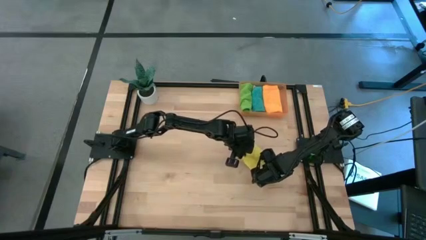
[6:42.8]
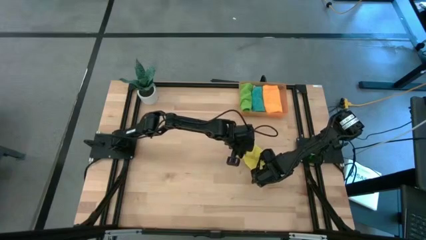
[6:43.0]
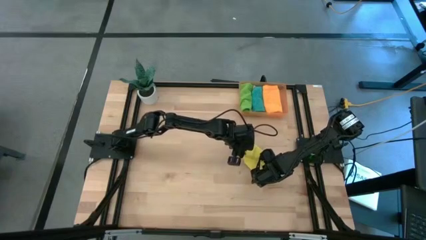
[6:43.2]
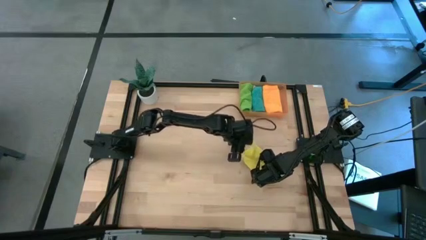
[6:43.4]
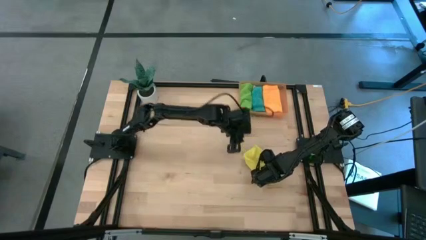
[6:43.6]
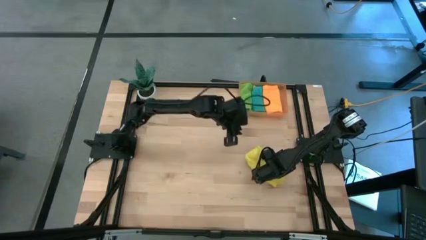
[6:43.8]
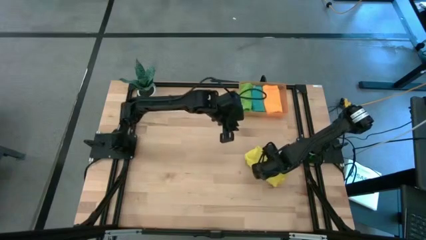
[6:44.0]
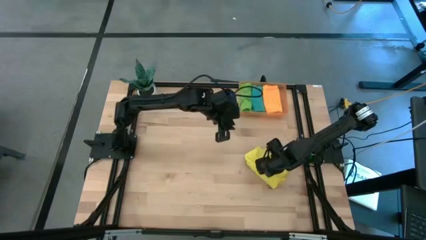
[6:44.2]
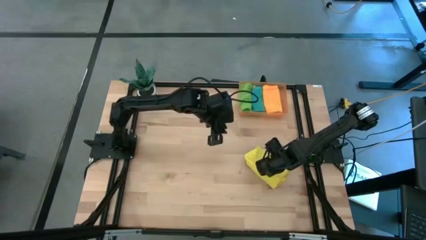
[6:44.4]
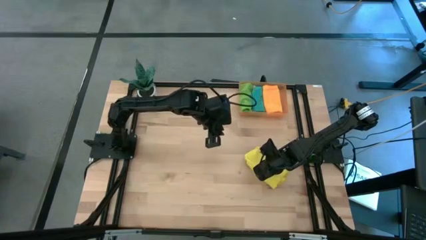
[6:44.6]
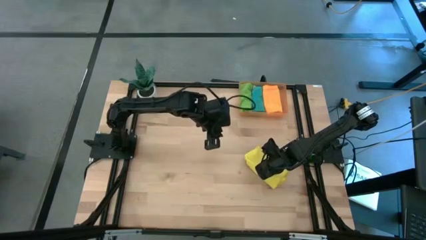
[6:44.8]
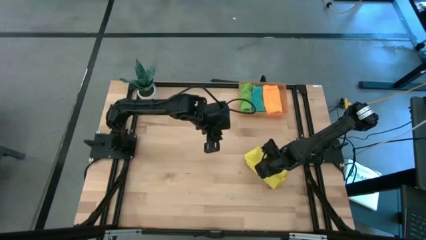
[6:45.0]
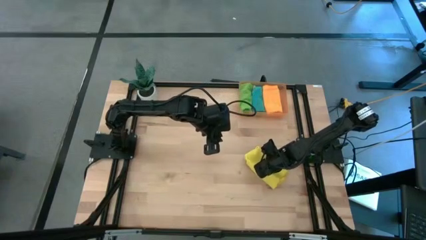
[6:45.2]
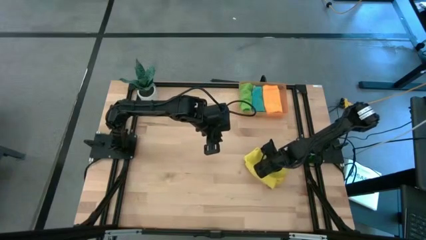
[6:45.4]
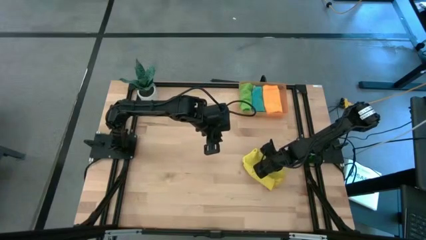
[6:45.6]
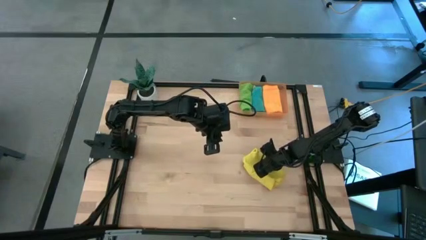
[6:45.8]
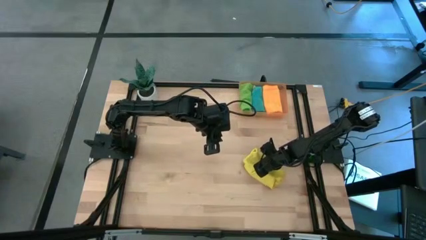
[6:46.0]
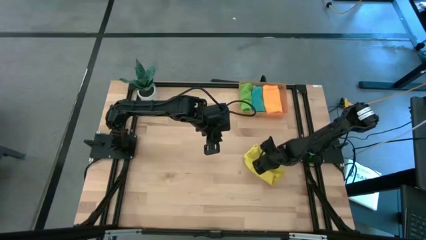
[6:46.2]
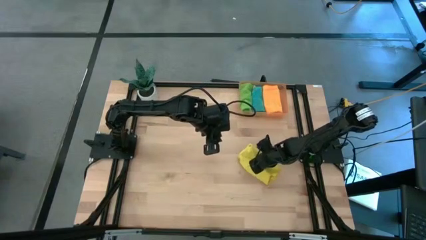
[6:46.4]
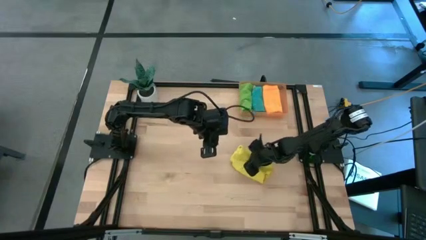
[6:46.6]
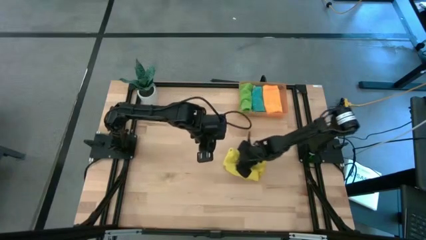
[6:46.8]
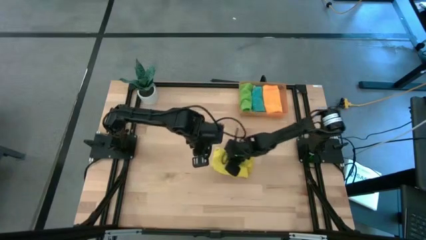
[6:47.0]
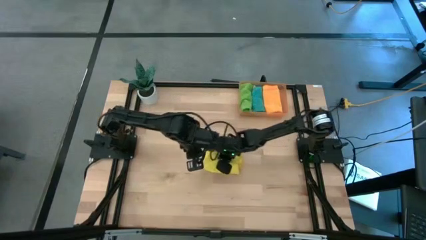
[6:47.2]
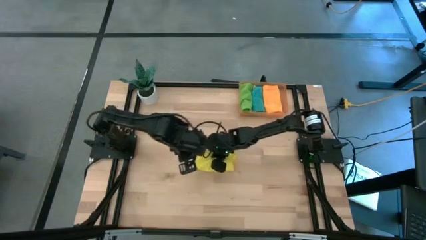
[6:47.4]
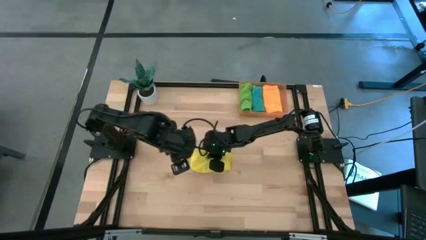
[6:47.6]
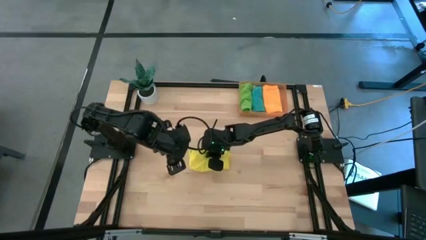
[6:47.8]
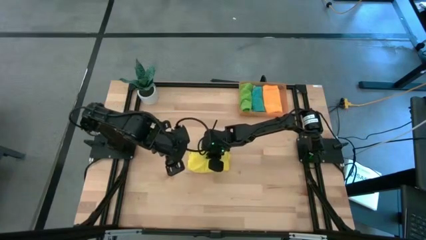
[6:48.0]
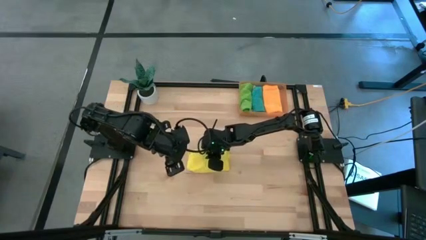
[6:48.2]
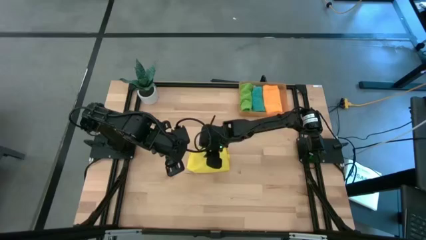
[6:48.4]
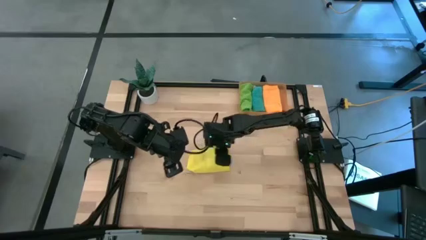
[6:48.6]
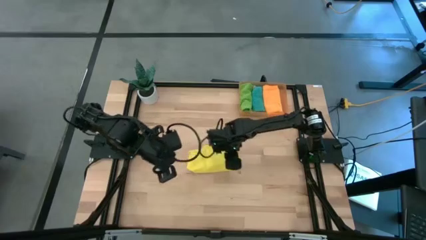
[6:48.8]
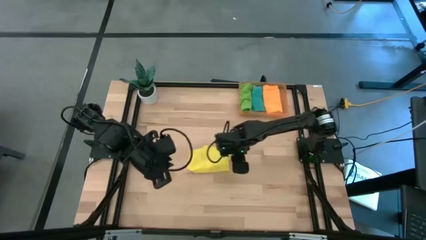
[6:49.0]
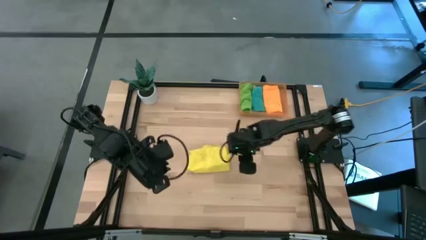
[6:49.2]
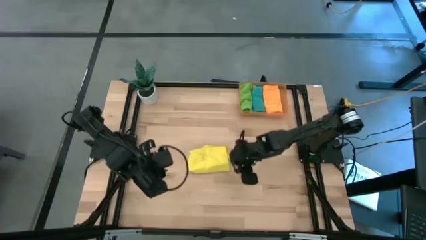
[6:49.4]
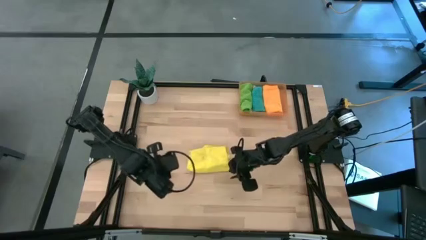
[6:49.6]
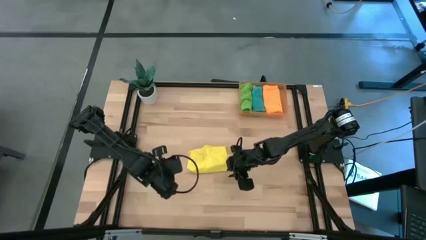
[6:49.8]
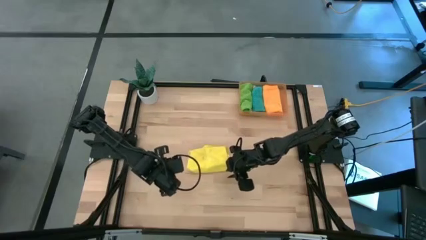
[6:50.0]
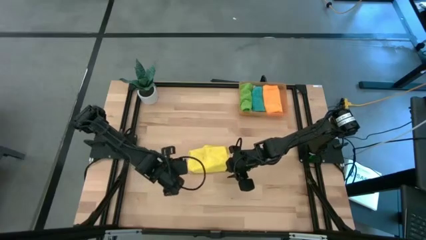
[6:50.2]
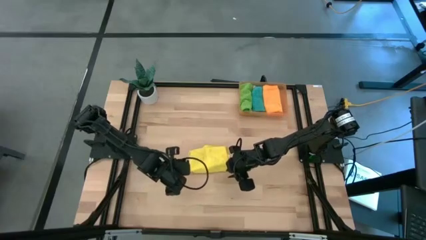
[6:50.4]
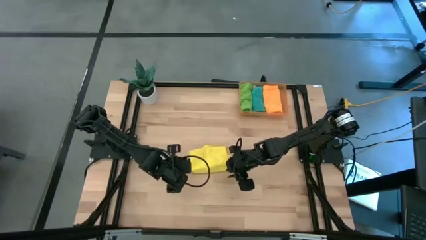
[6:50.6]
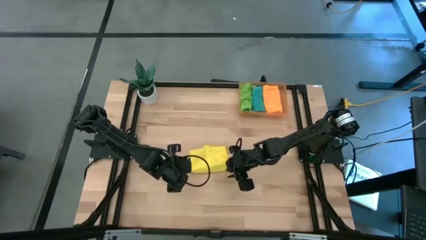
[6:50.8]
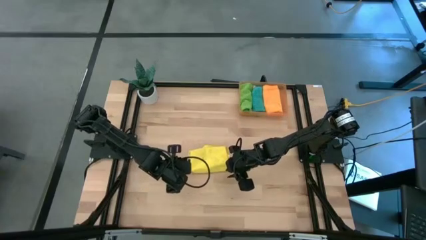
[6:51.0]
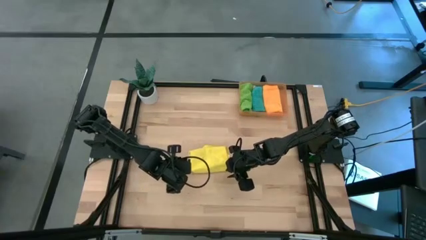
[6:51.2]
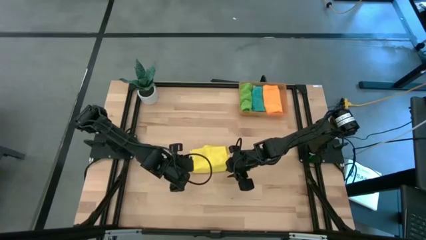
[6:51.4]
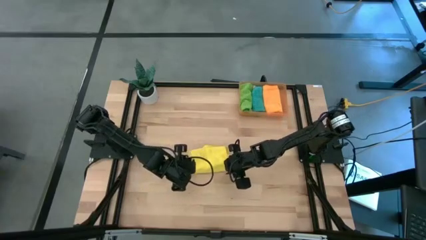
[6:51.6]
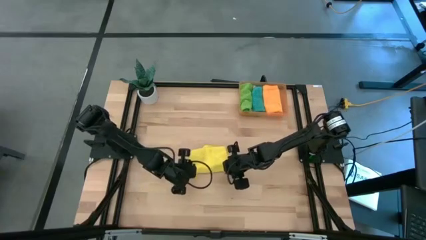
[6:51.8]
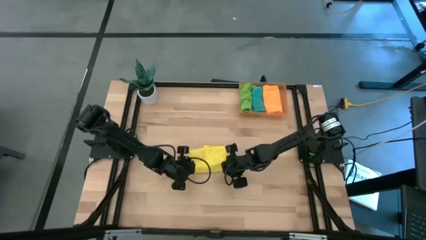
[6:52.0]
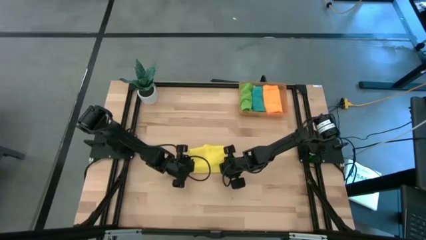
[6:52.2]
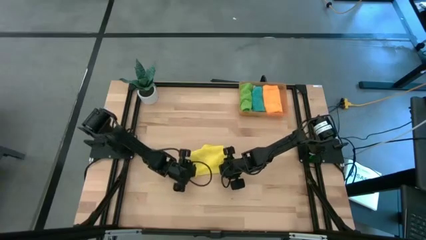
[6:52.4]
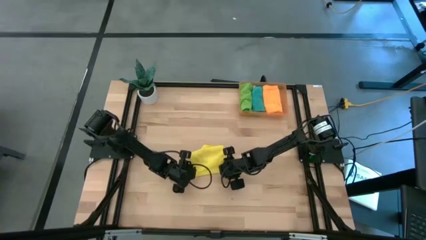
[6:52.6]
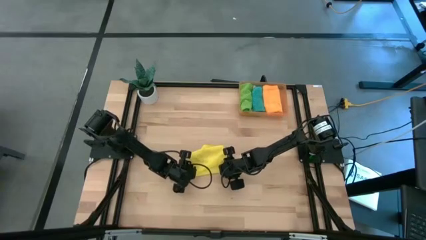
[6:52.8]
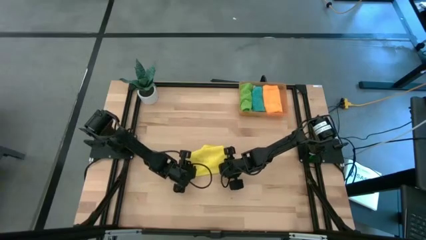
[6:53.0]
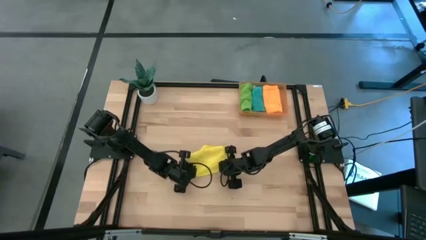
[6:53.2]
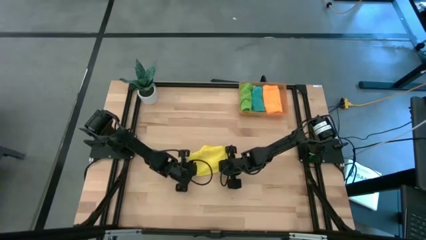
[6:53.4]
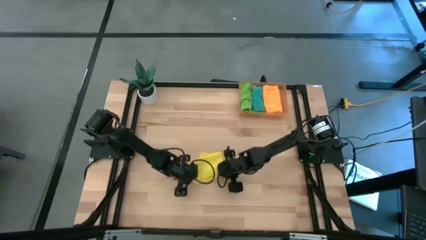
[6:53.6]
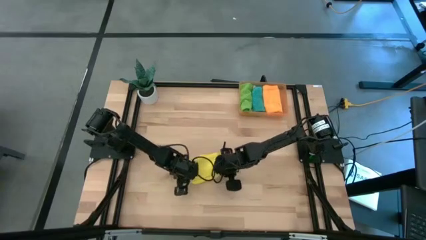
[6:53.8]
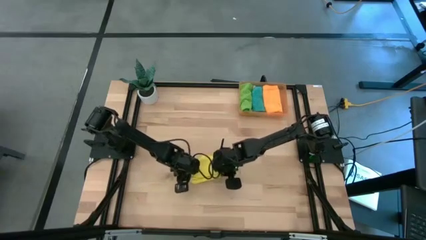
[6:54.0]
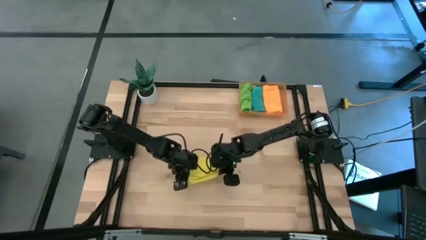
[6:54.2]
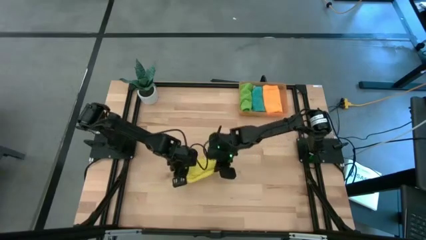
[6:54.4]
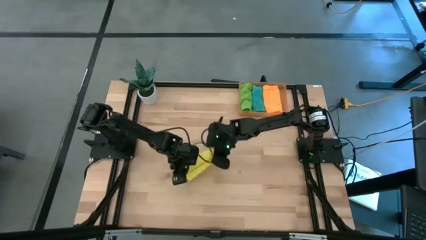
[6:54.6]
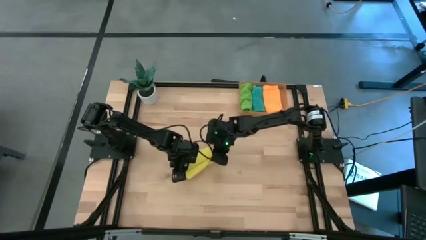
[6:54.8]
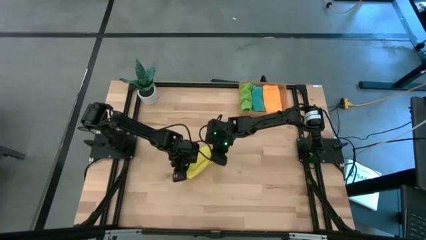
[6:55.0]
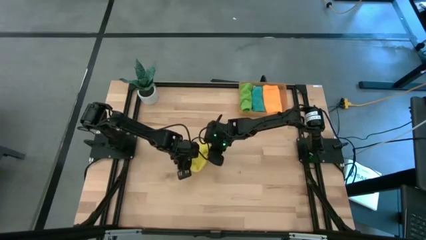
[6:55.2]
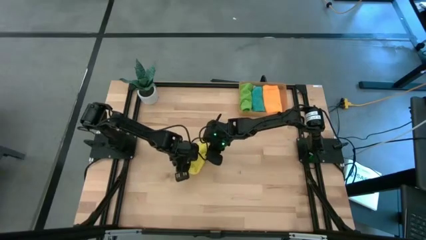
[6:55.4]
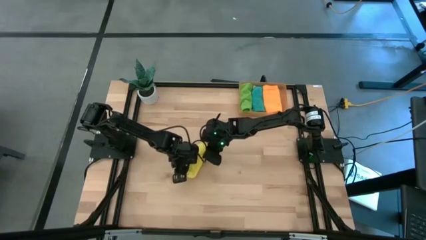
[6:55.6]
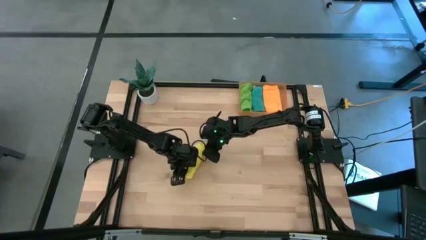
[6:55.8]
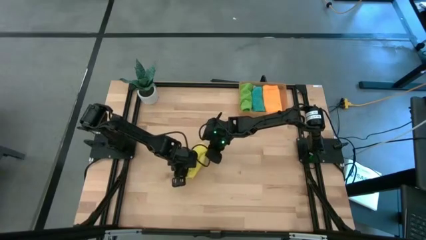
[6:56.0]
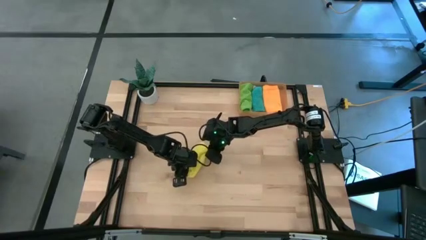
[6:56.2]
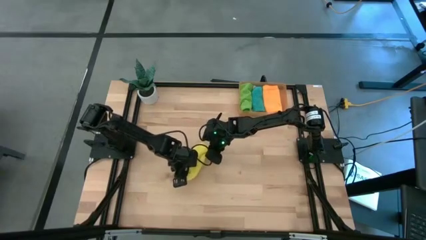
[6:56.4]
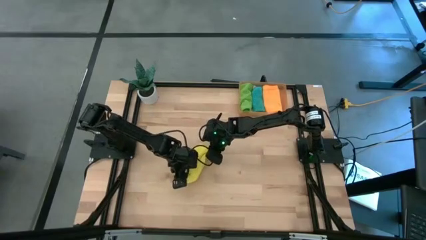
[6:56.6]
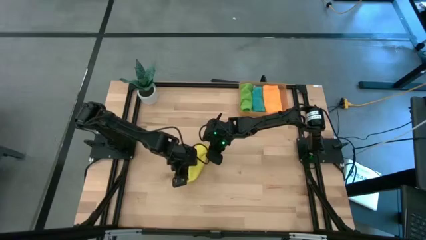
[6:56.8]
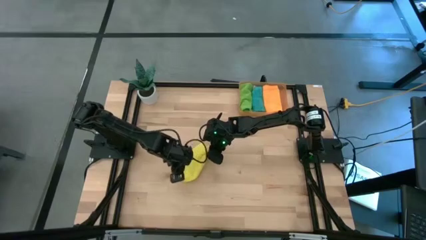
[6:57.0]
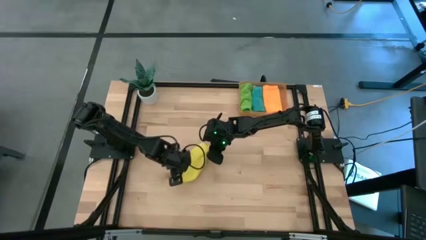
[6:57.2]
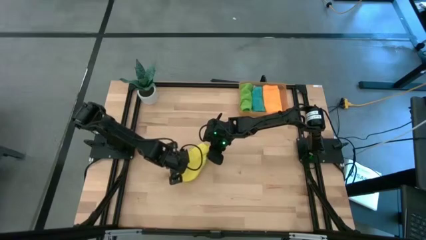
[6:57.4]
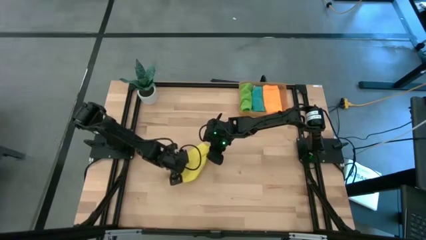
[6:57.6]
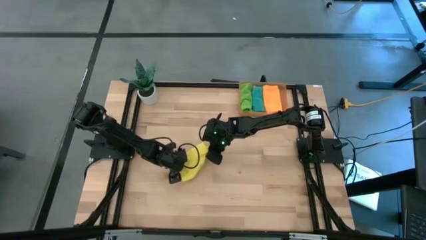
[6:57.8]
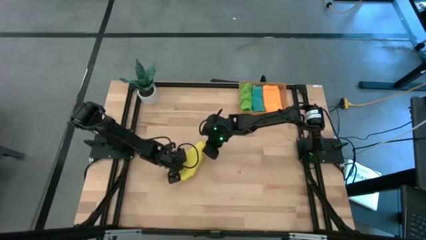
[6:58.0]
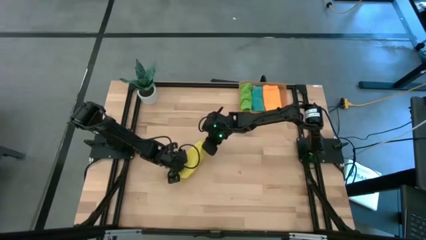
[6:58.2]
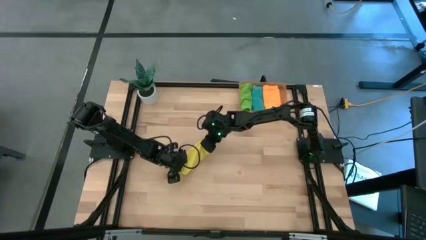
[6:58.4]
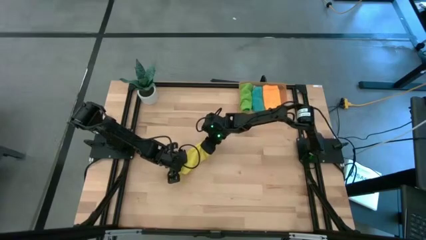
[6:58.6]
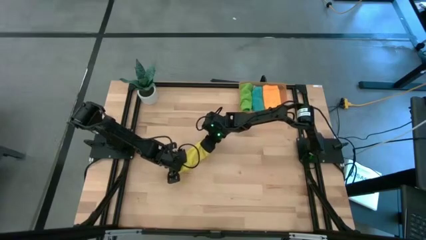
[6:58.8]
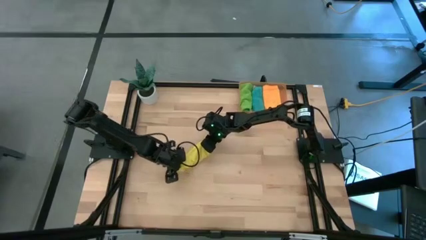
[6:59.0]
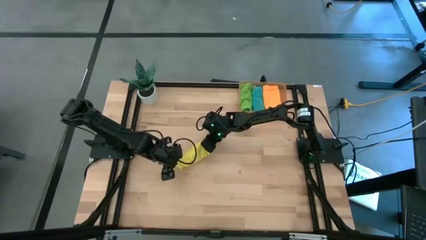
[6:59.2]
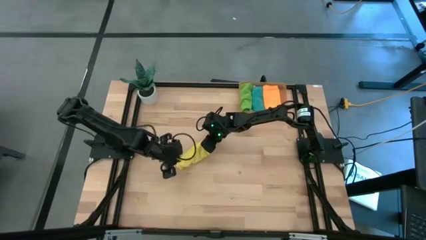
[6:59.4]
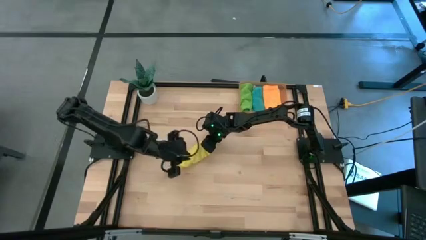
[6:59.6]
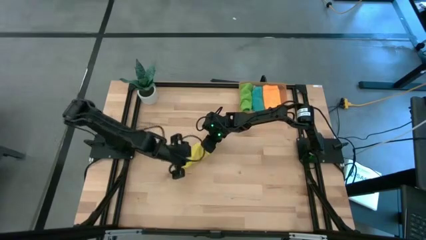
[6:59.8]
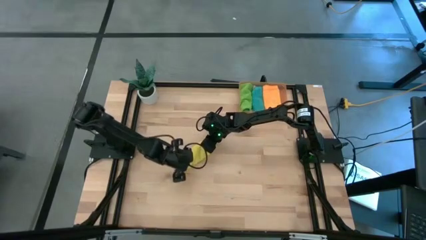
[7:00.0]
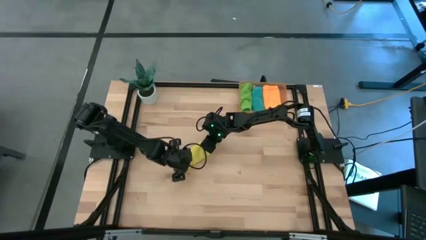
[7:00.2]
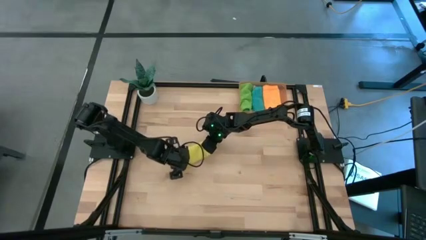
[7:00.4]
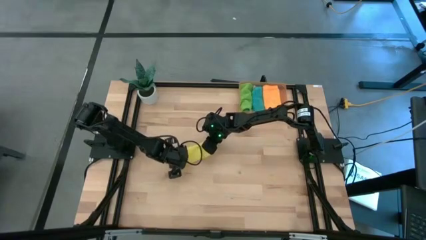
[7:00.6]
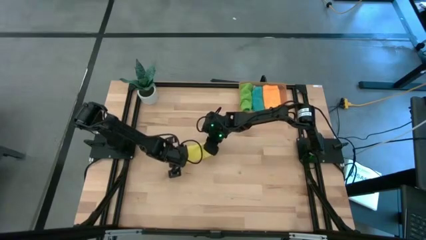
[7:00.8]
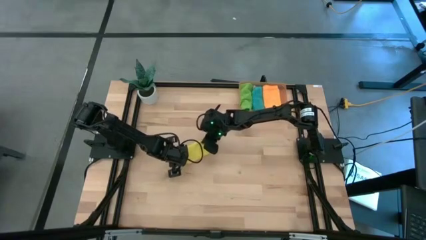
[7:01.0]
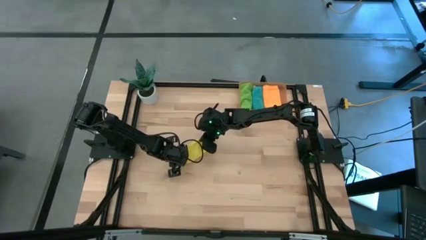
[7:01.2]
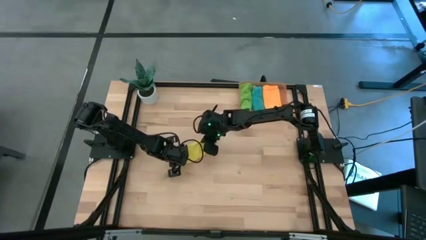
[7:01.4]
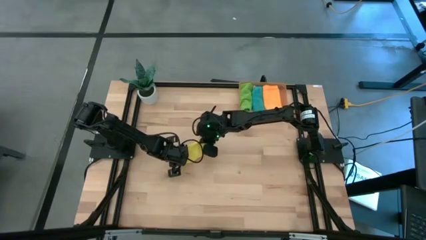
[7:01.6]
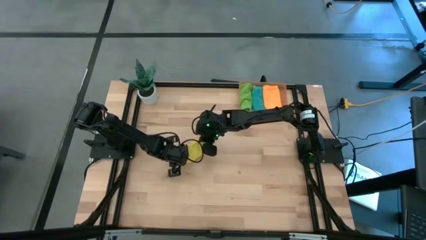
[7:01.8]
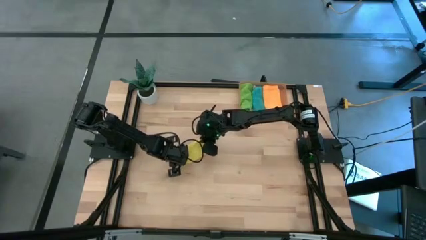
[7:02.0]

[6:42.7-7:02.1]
Task: Roll microfiber towels into tight, uniform cylinder then place into a basket
Fold the yellow towel
